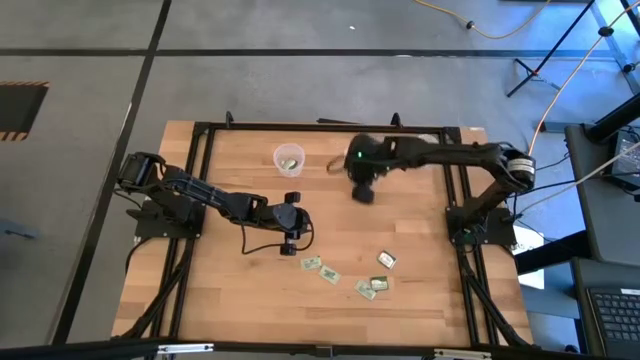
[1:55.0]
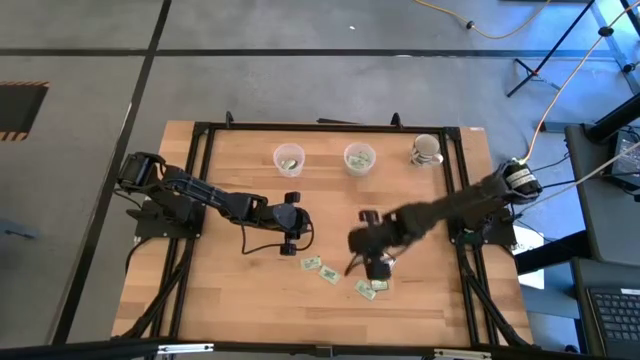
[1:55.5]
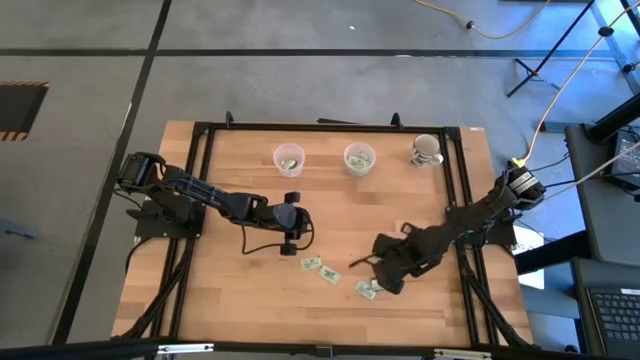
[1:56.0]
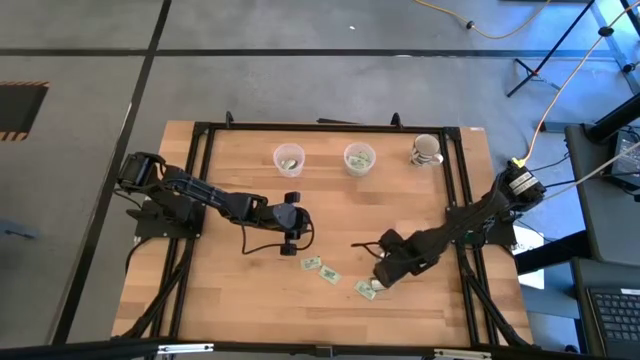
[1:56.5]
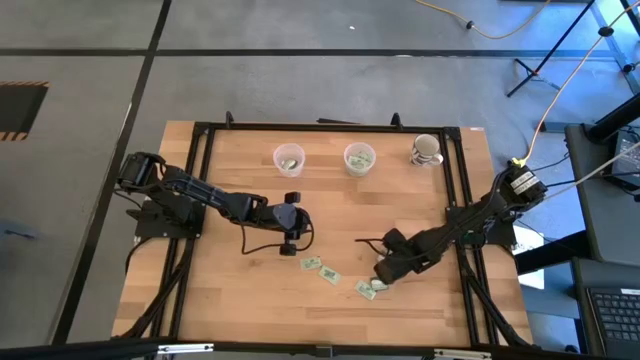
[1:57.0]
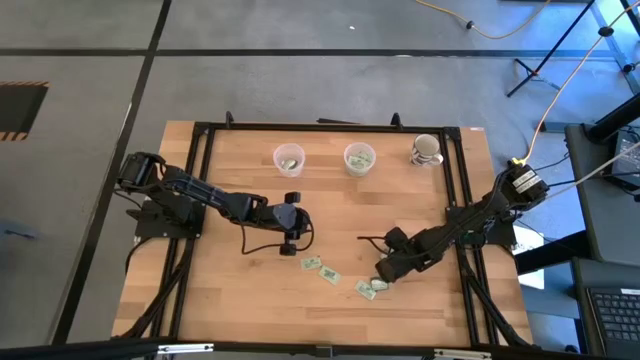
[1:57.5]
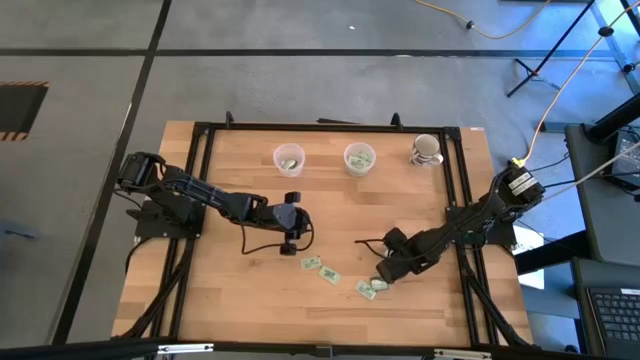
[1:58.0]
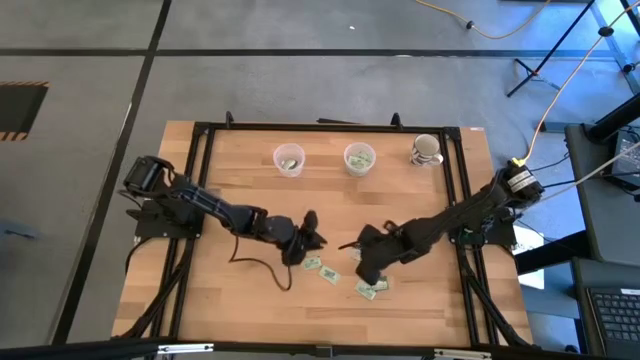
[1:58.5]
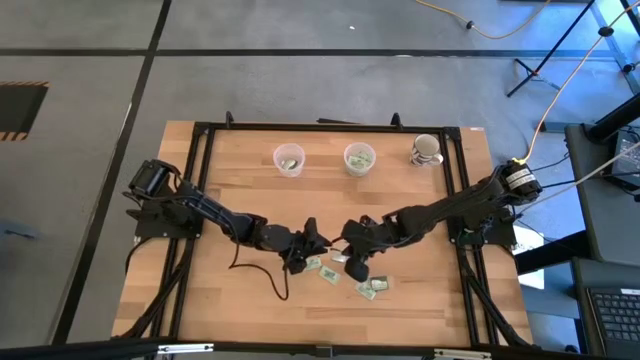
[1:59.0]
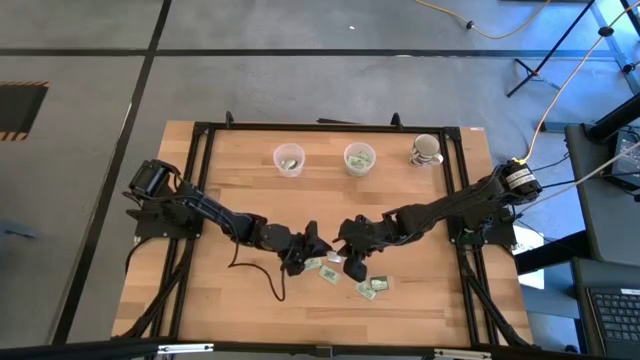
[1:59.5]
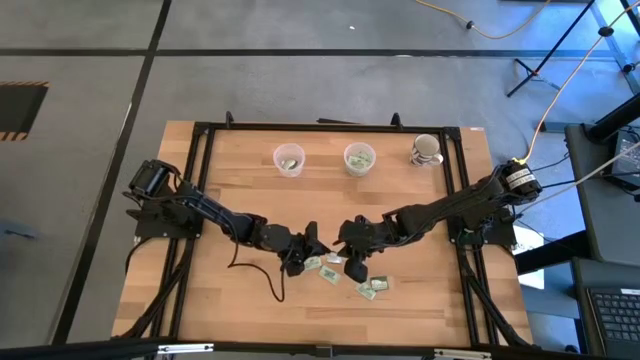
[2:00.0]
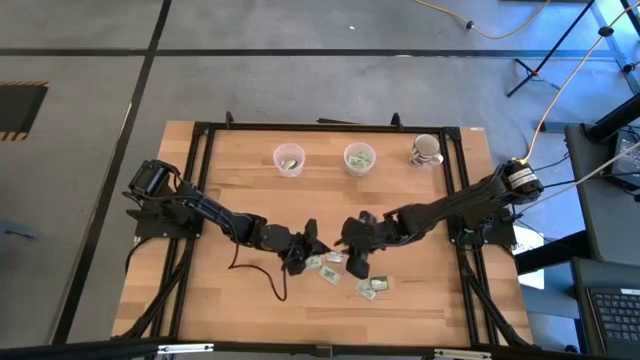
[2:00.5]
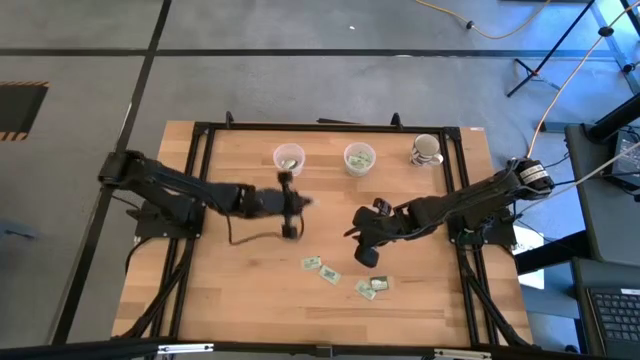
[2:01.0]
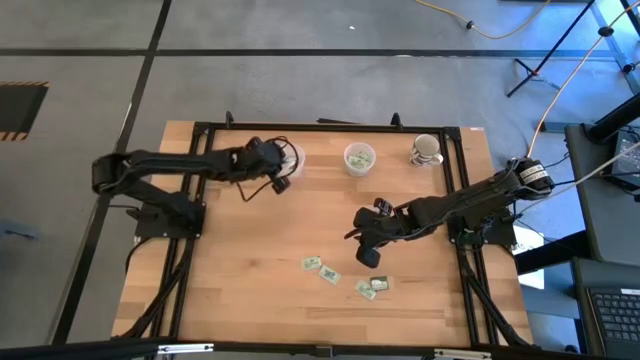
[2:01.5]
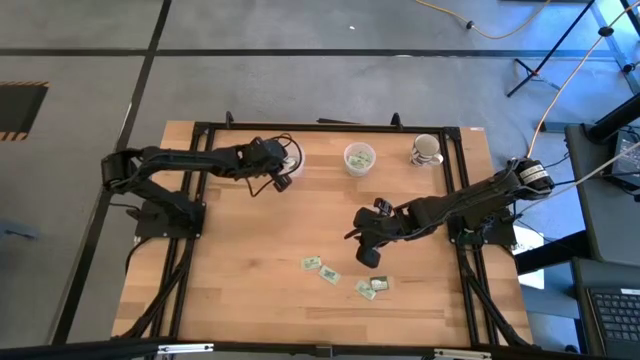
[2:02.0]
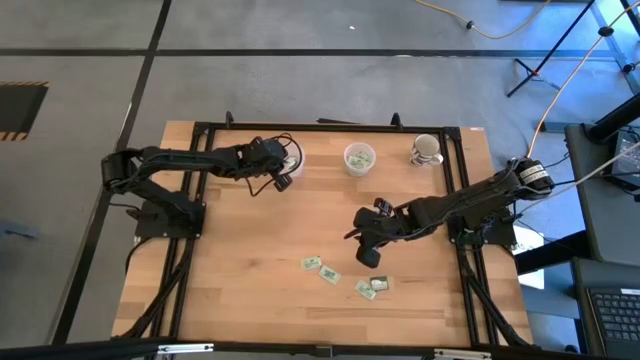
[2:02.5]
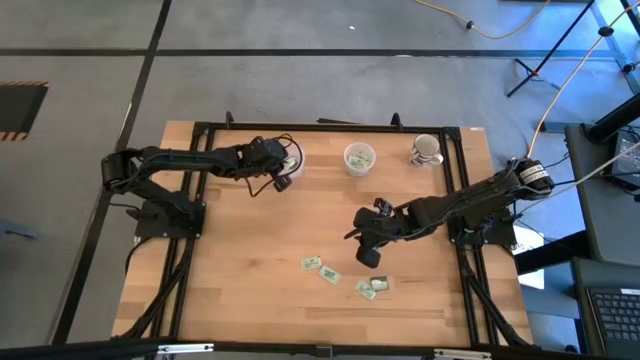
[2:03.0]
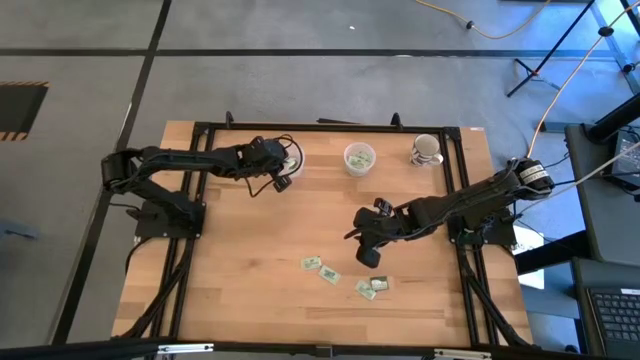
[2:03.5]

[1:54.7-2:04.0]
Task: Pick and place Stevia / Truvia into bins
Put the truvia packet into the left transparent container

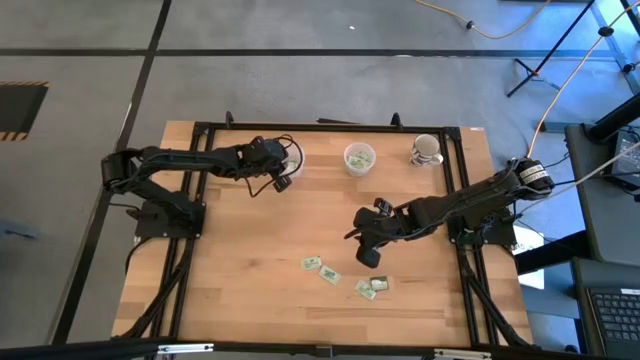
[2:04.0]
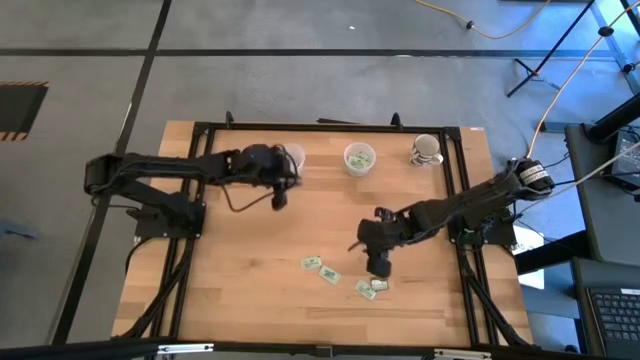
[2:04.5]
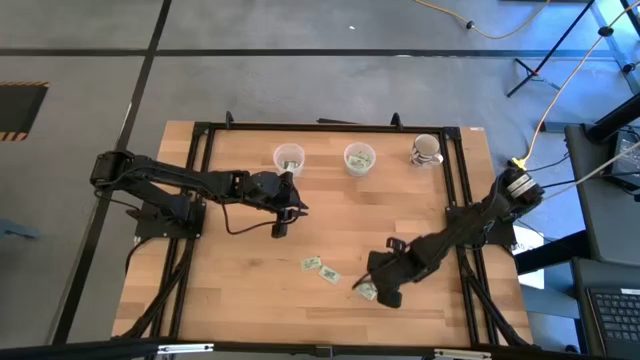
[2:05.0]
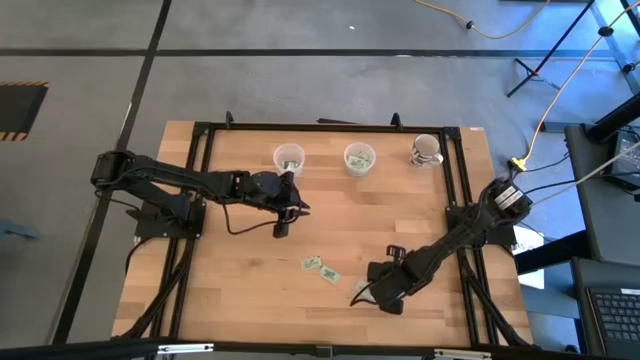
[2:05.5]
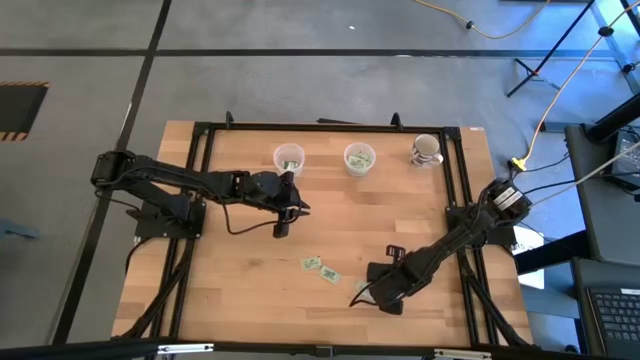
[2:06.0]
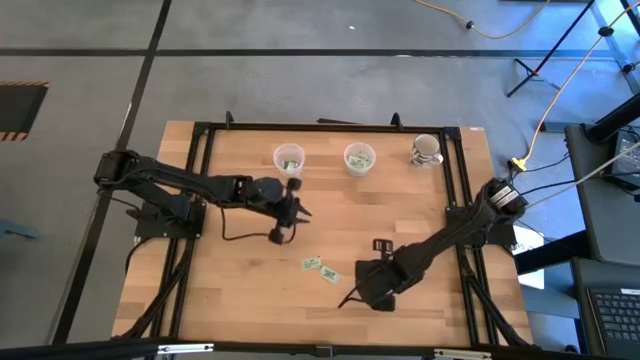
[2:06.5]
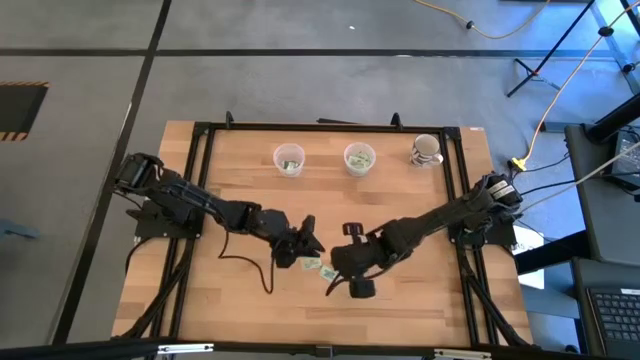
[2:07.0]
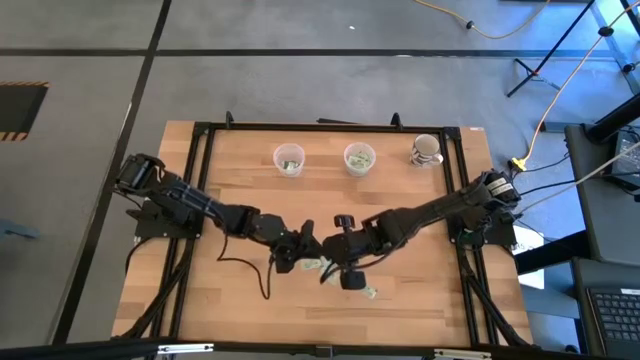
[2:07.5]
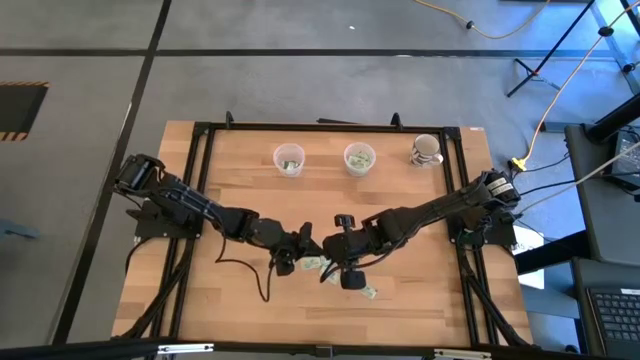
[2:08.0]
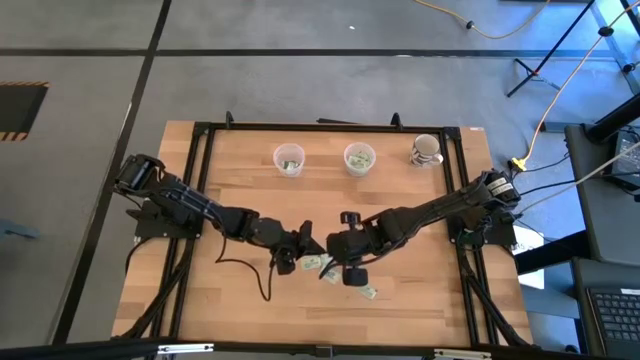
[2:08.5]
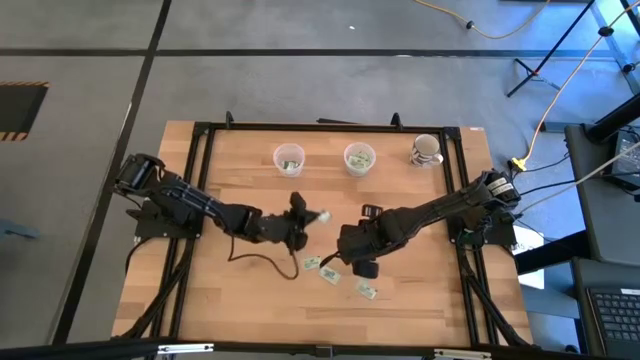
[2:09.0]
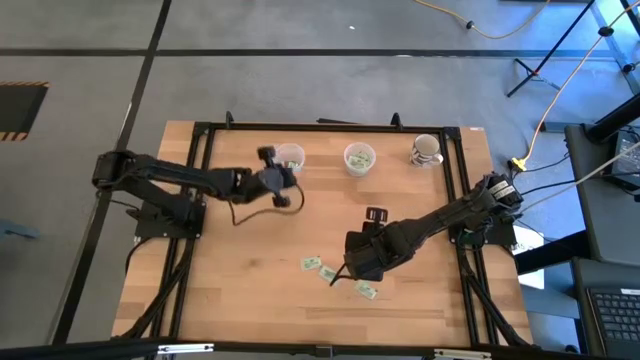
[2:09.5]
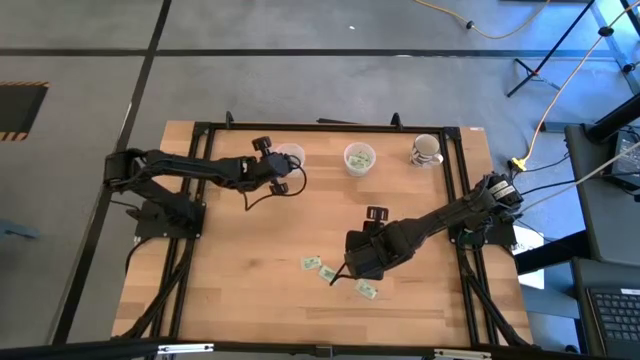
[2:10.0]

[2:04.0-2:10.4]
Put the truvia packet into the left transparent container

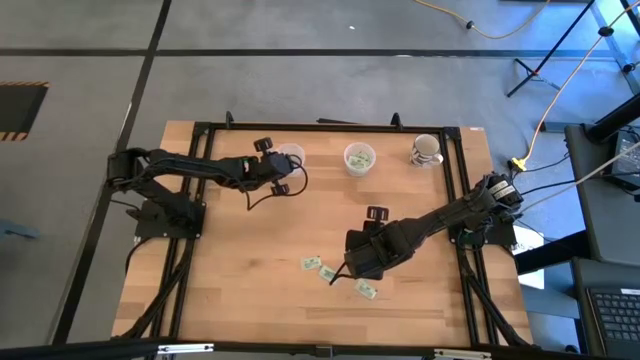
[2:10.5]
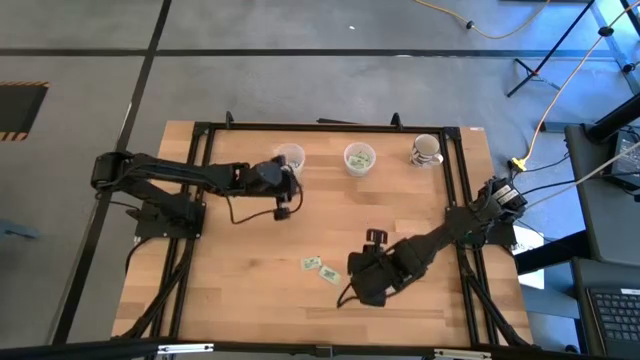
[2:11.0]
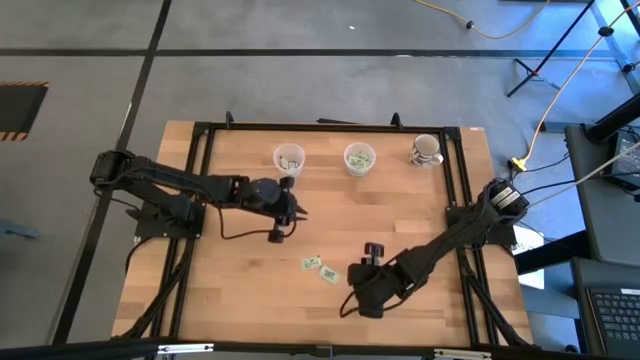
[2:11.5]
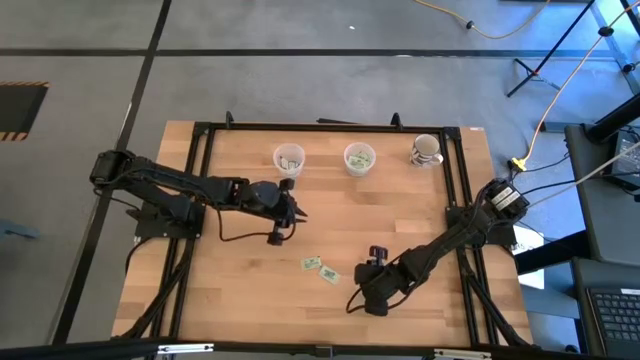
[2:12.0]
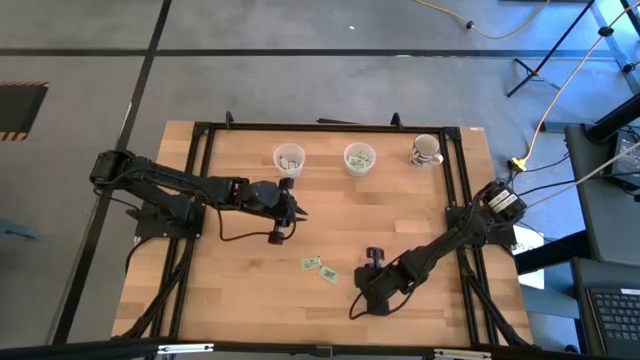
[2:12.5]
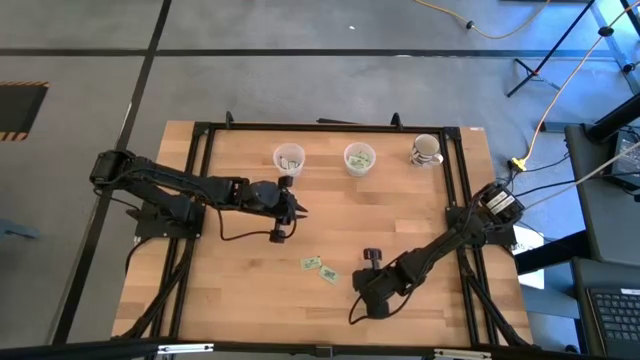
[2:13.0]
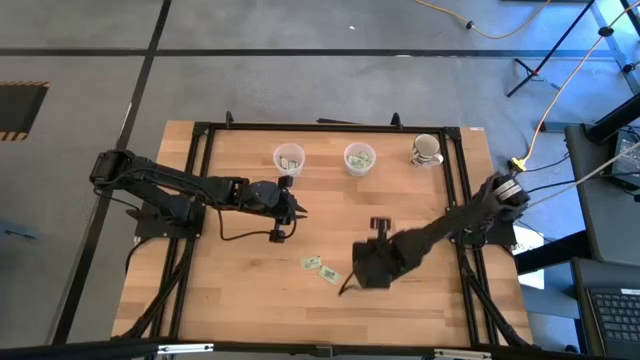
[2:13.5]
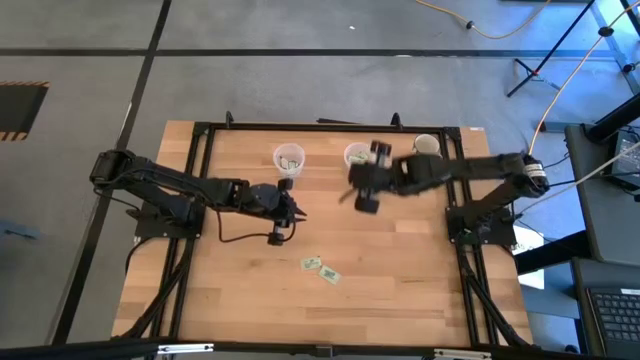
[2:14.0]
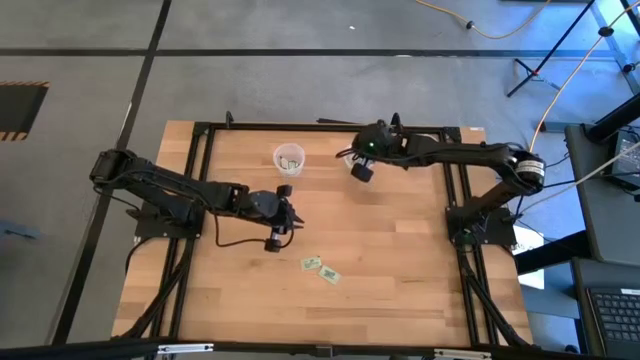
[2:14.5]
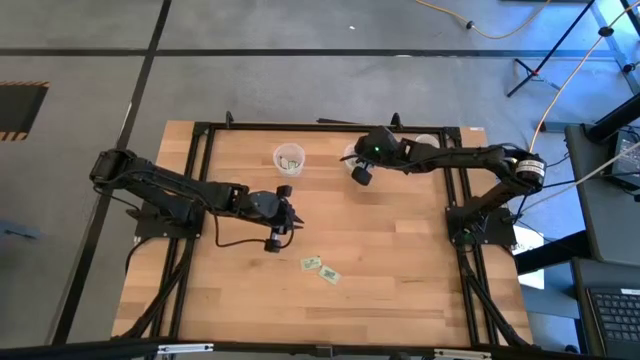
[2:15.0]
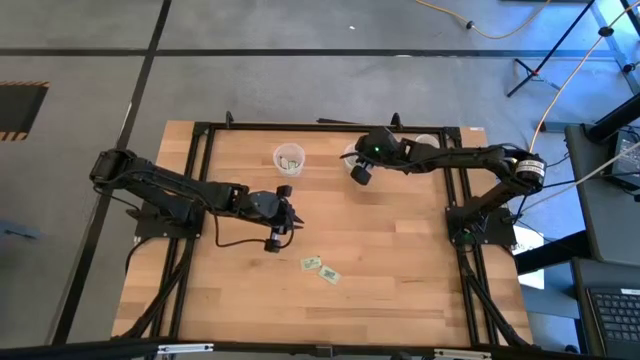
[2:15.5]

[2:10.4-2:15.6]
Put the stevia packet into the right transparent container
